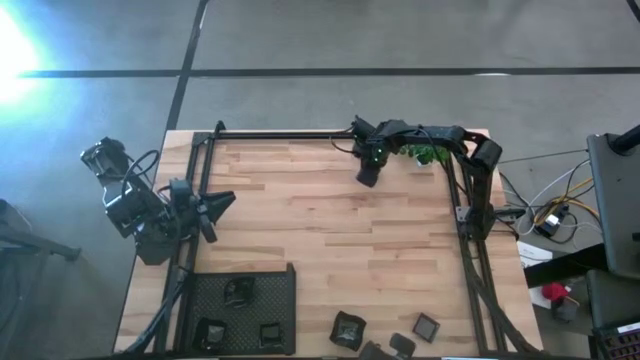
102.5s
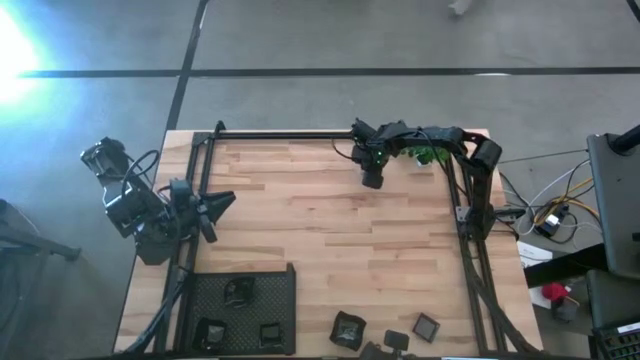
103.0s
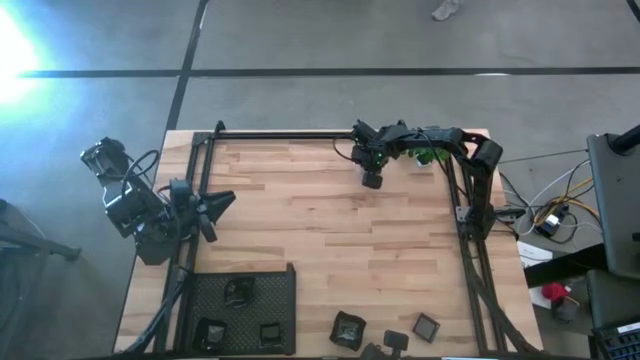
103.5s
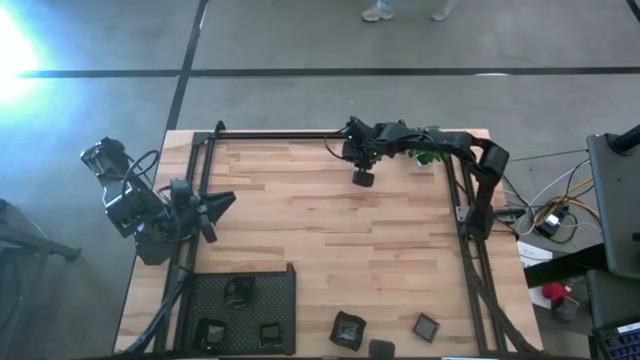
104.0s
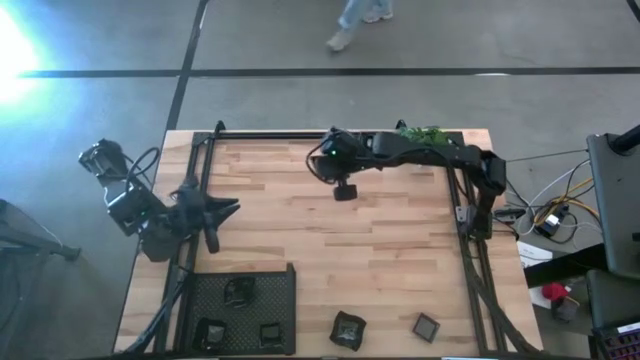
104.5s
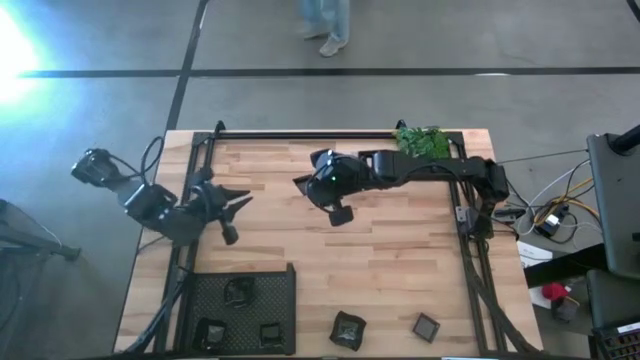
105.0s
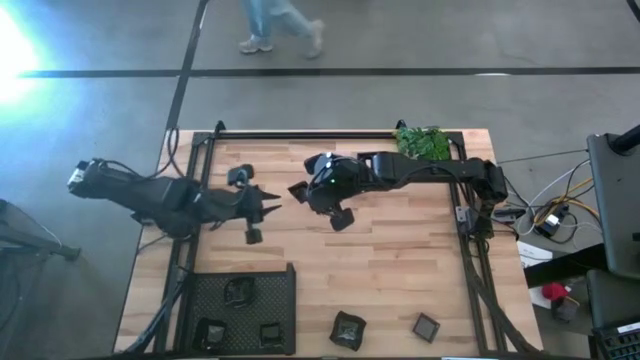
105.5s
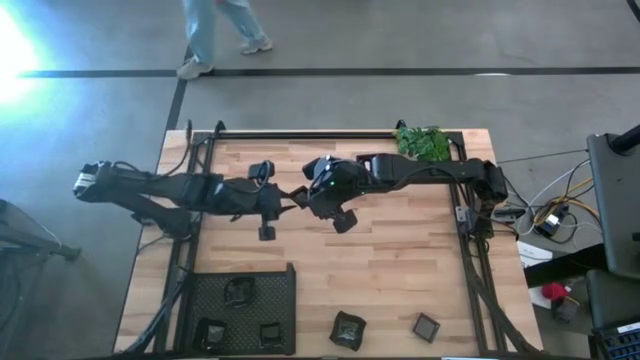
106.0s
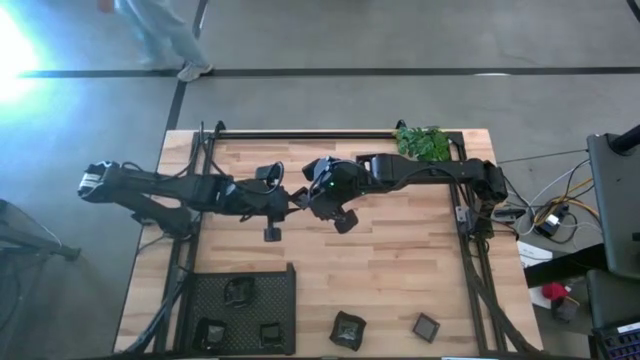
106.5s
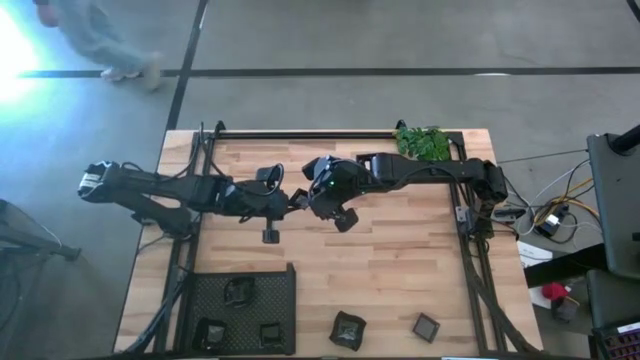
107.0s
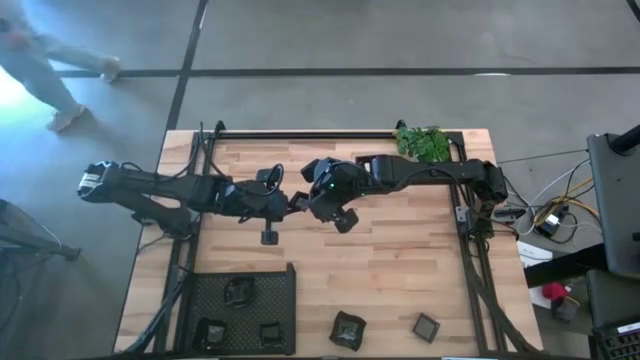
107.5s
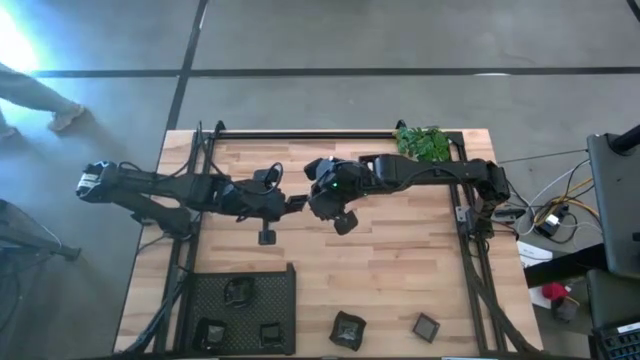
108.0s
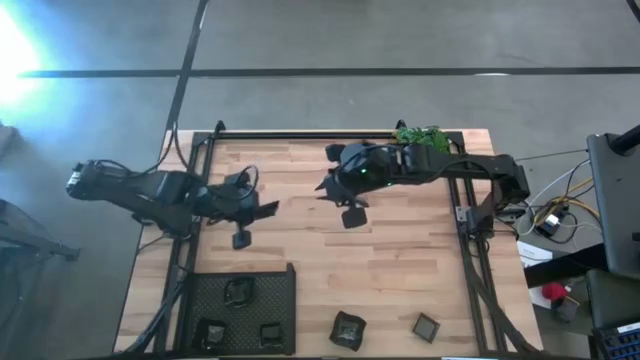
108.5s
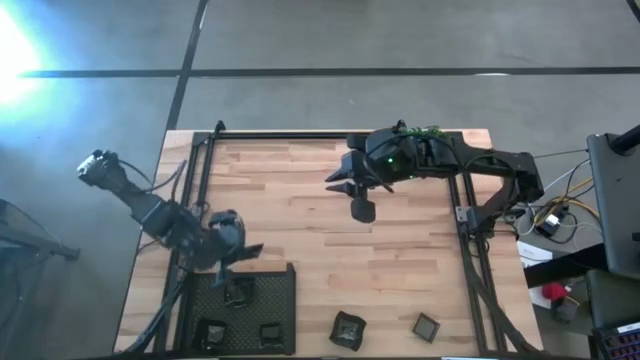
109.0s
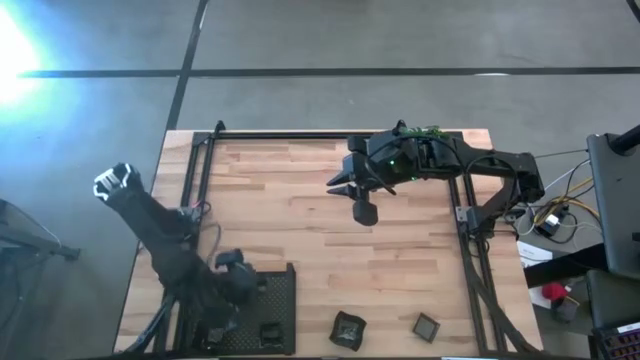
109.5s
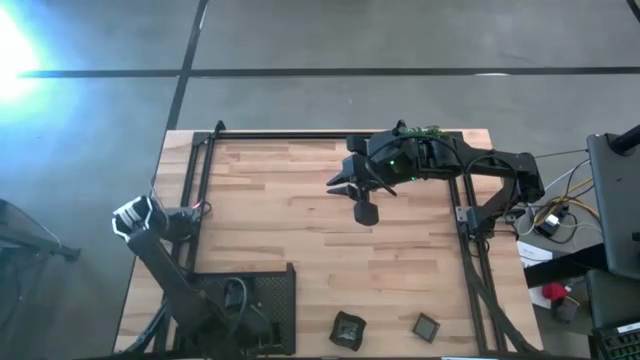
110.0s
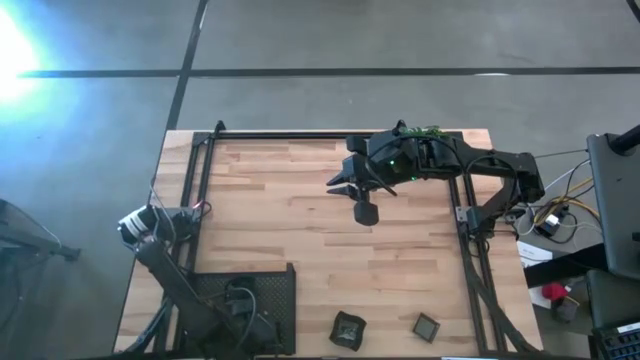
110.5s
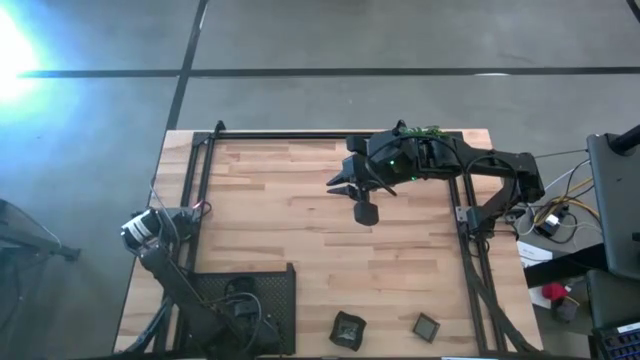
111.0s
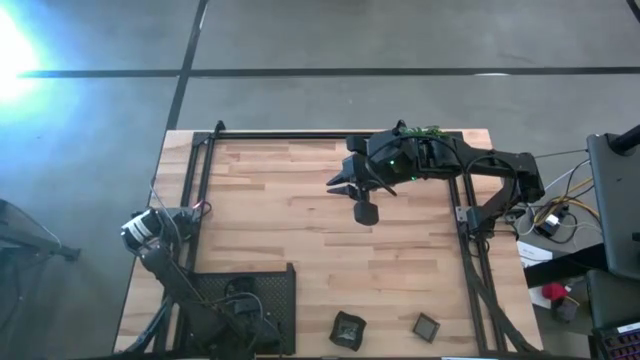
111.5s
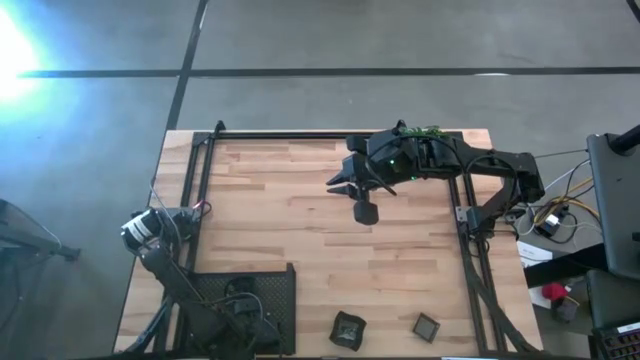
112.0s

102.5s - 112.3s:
Task: Pick & Place Mini shaped plates
Stack the black square plate on the black square plate on the shelf

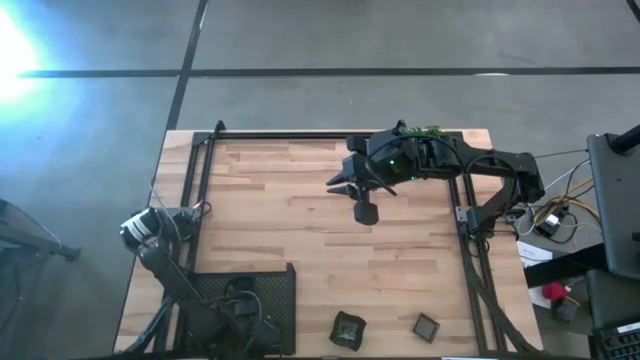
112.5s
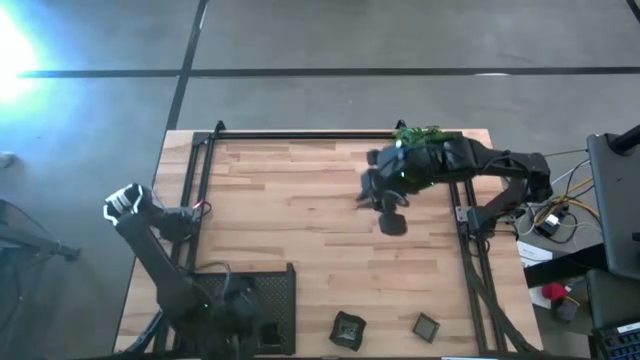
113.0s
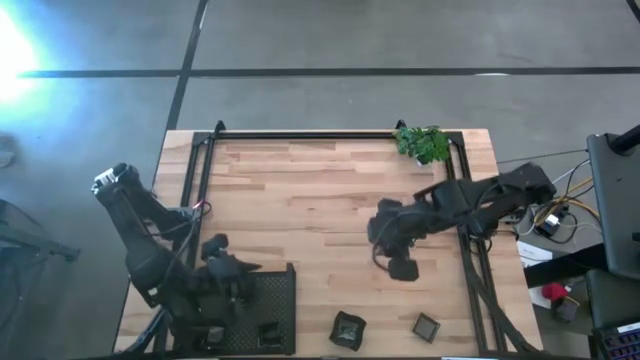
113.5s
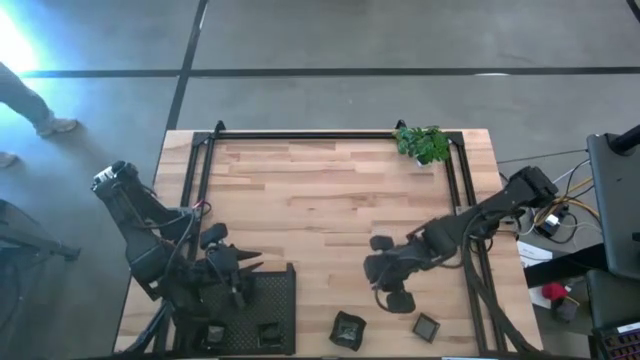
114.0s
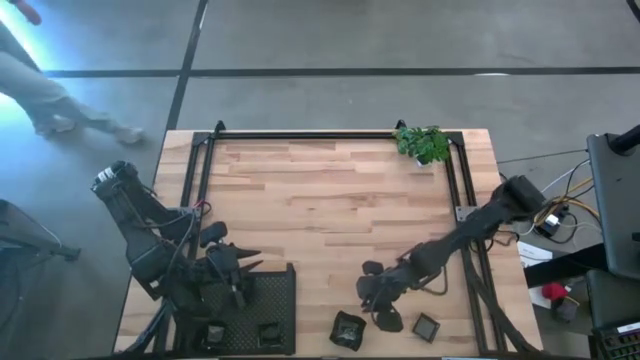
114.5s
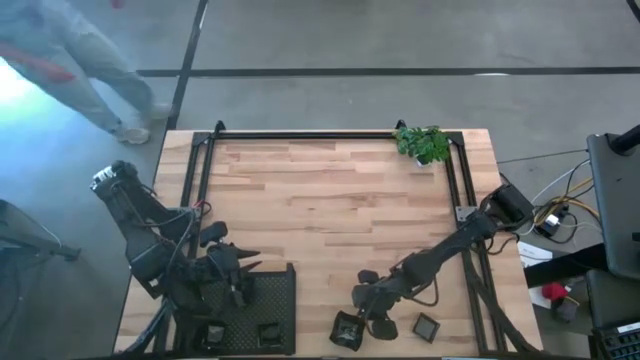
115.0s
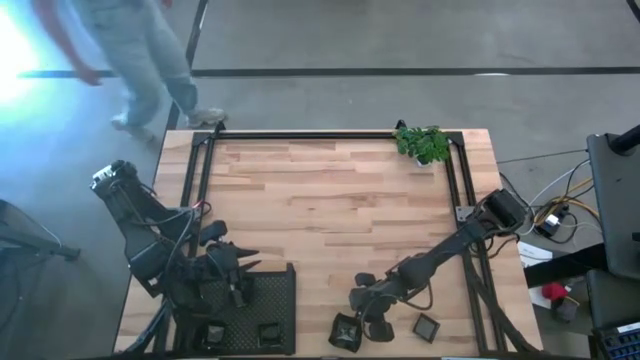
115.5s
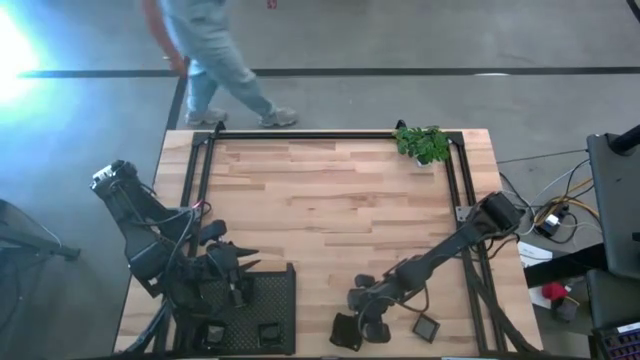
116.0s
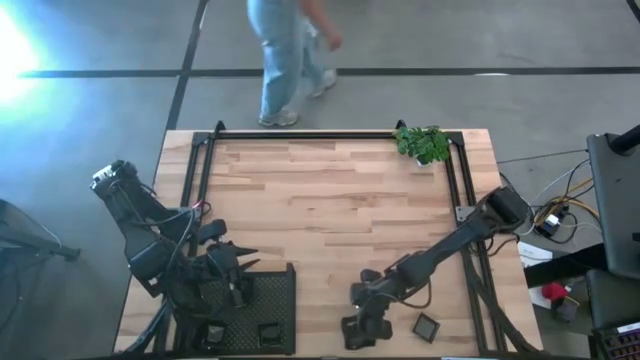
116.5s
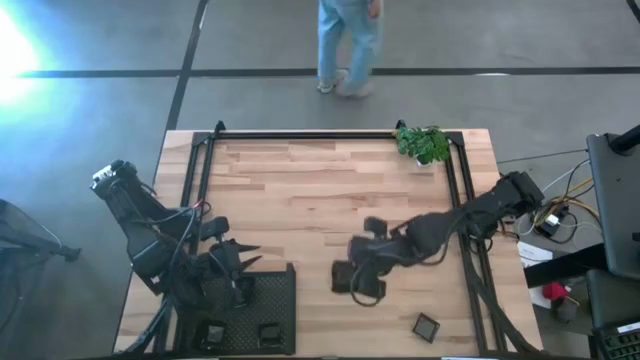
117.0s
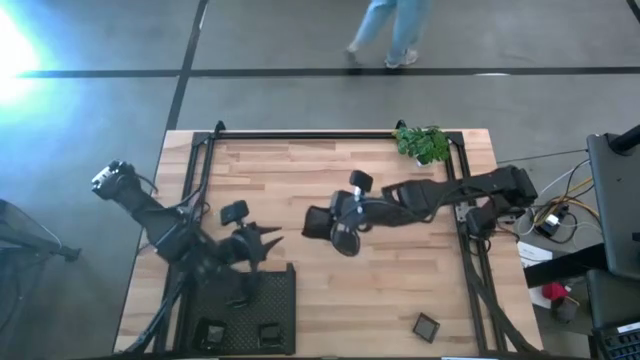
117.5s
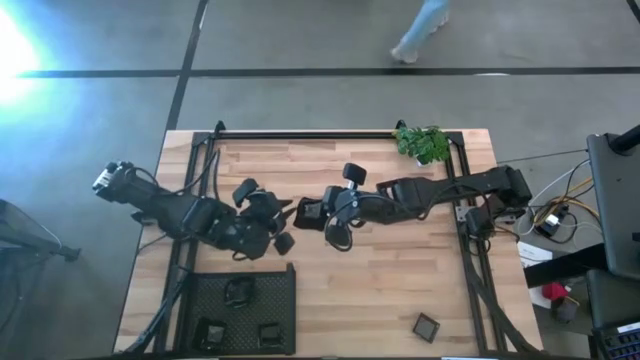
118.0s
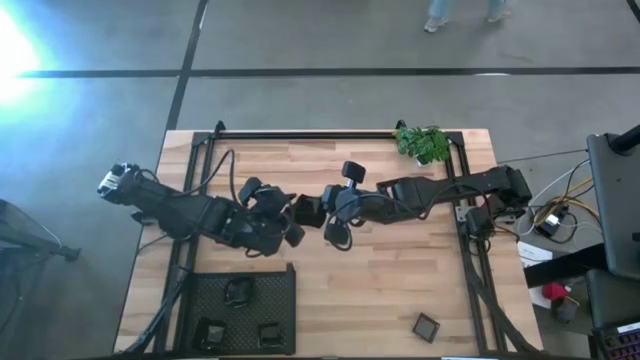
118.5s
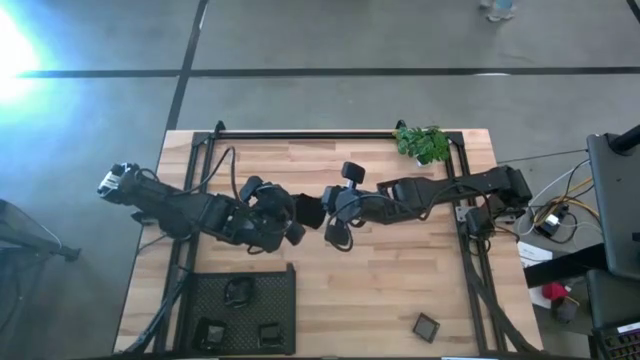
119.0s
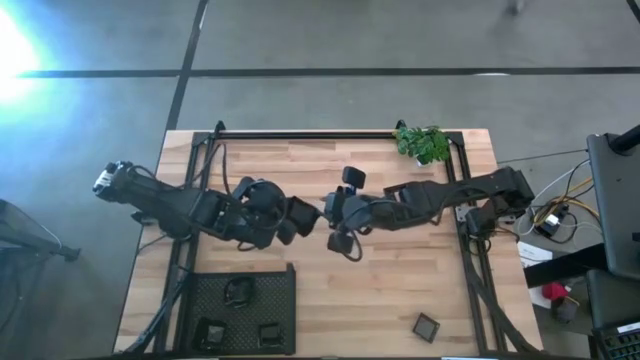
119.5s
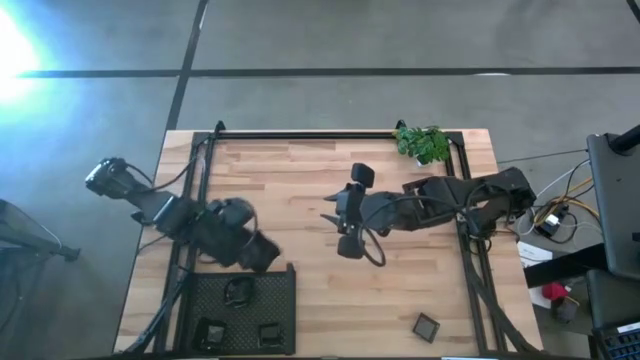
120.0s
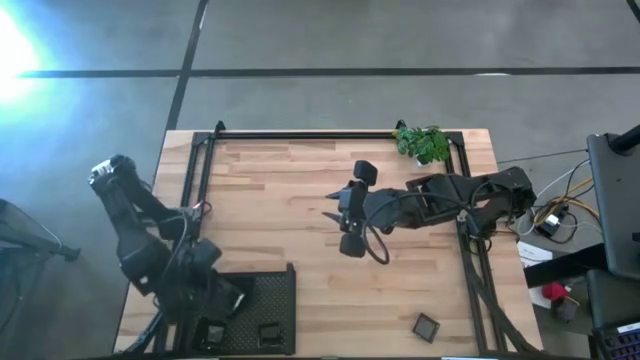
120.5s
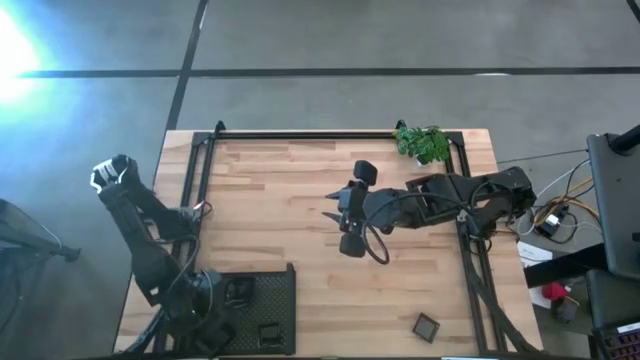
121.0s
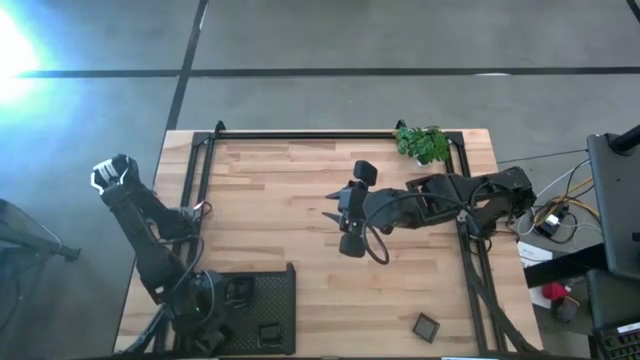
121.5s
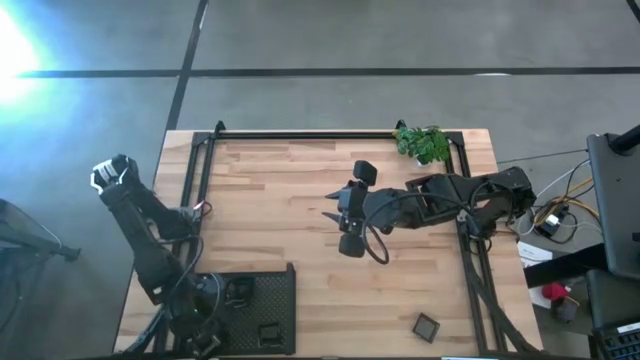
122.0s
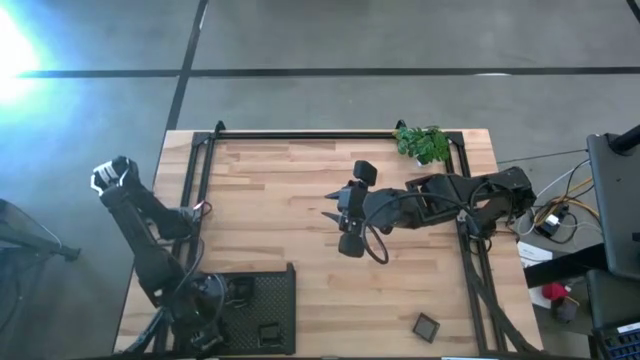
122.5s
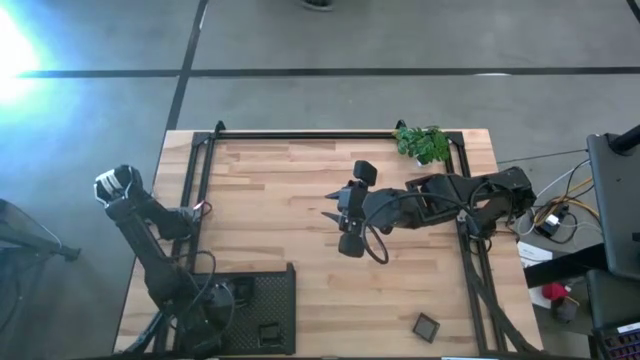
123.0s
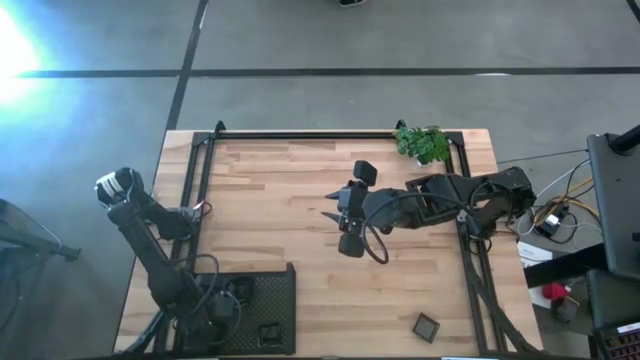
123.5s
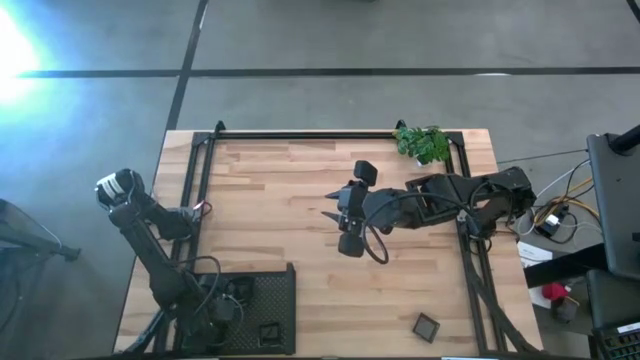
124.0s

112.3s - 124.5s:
Stack the black distorted square plate on the black distorted square plate on the shelf
